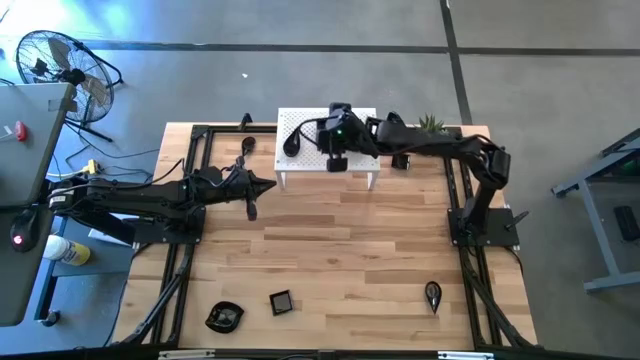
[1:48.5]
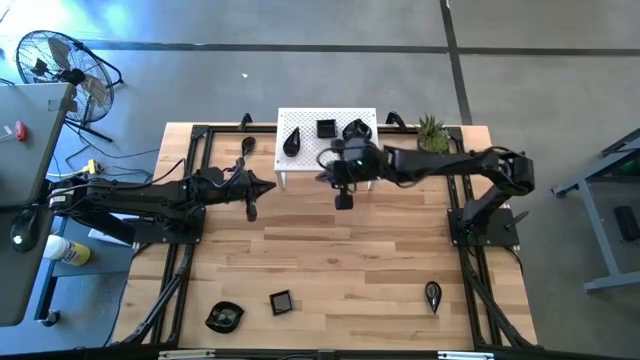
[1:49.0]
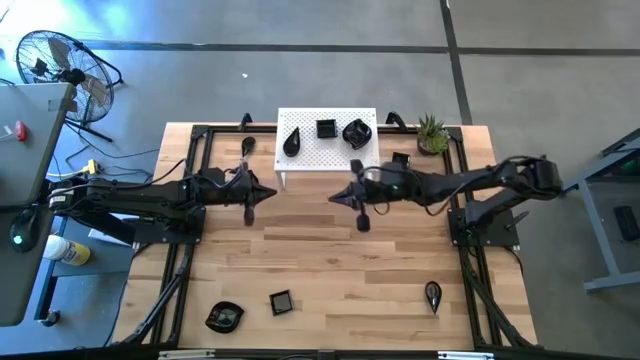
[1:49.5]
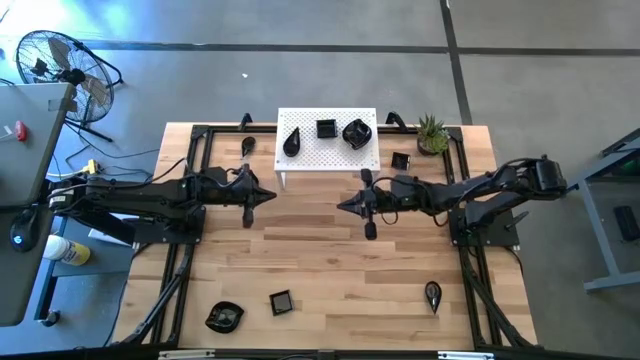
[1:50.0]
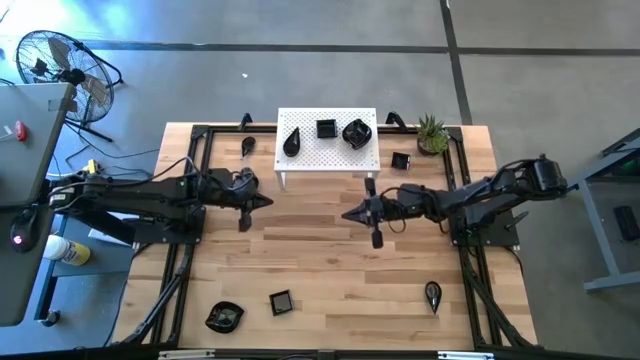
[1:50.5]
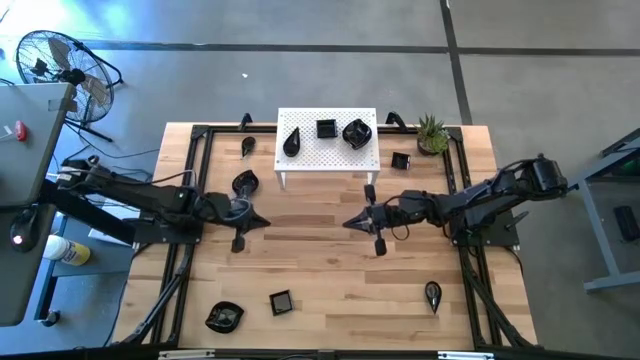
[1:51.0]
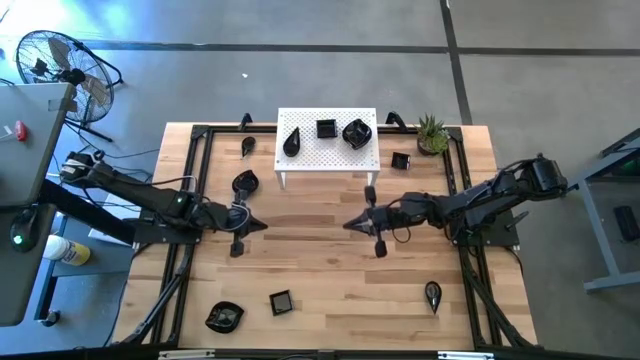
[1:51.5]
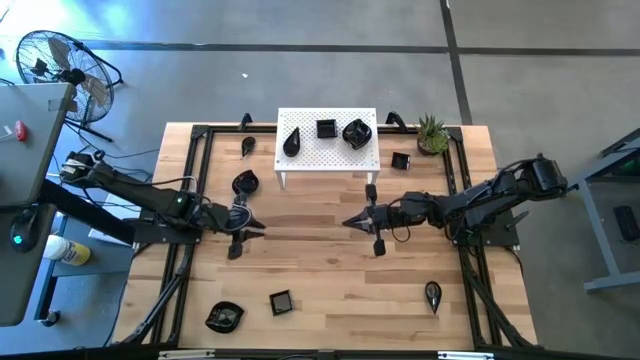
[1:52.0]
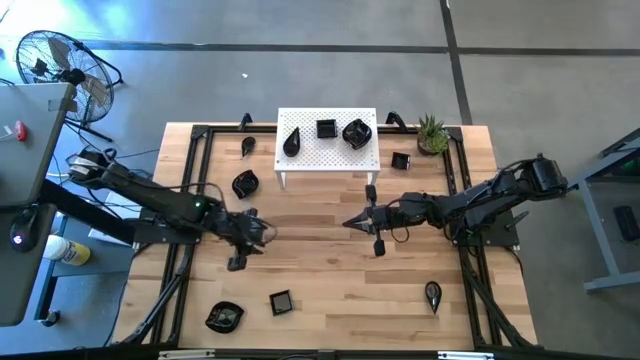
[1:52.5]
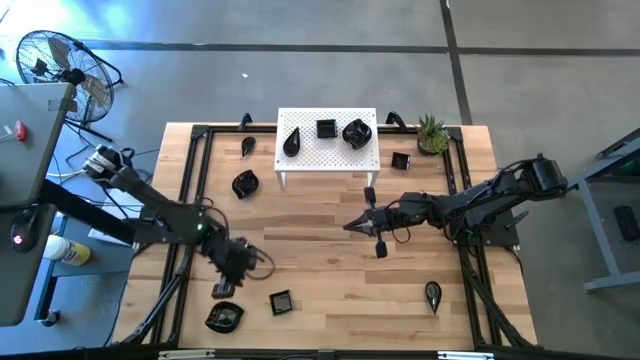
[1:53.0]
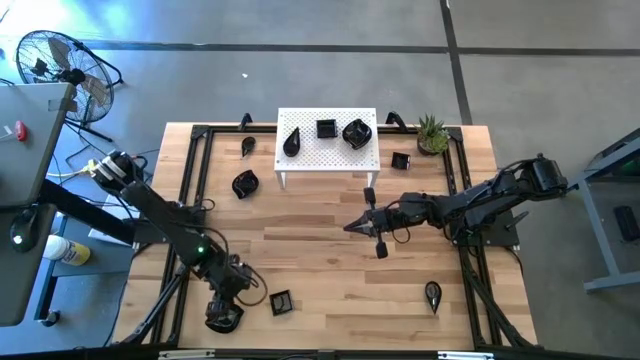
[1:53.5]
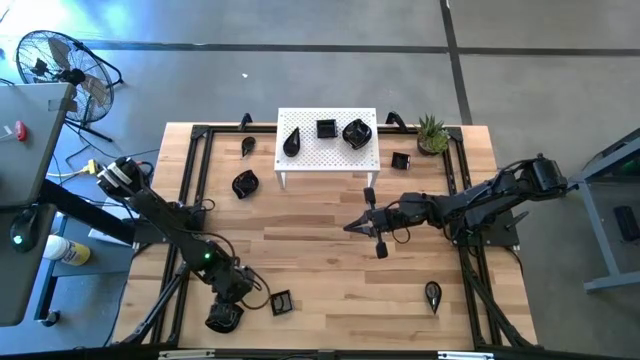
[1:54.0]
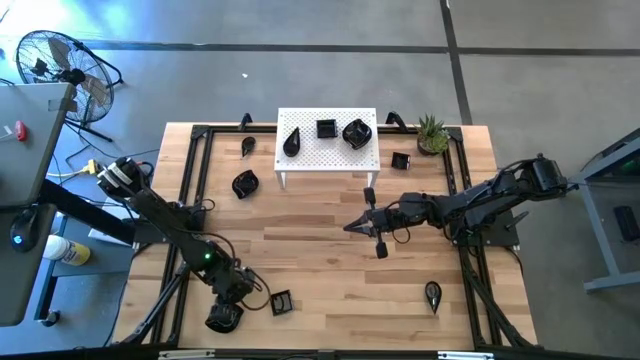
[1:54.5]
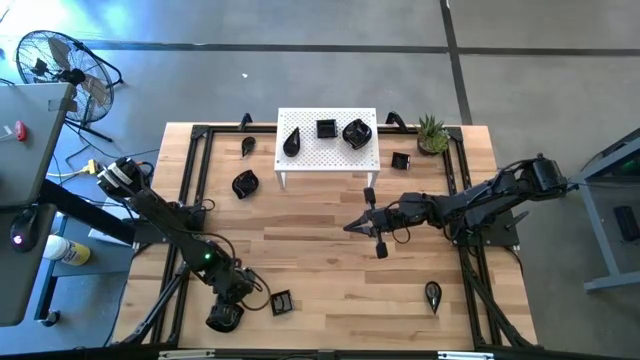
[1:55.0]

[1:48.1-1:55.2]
Task: Pick & Place Mini shaped plates
Stack the leaf shaped bowl on top of the leaf shaped bowls on the shelf

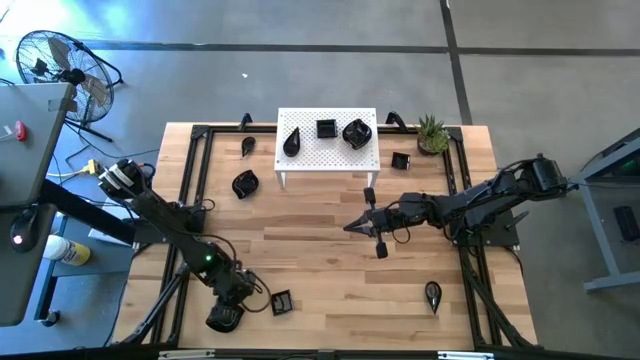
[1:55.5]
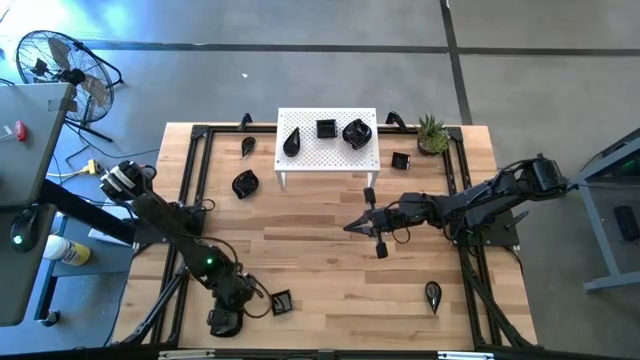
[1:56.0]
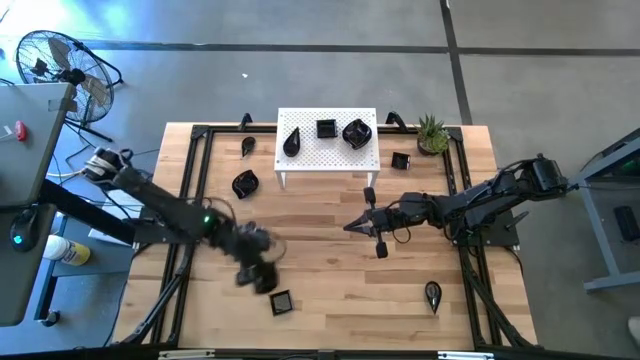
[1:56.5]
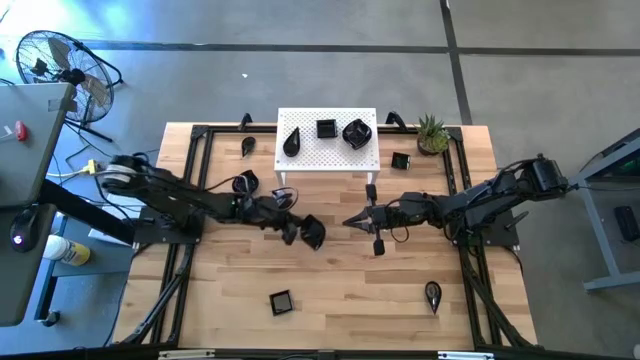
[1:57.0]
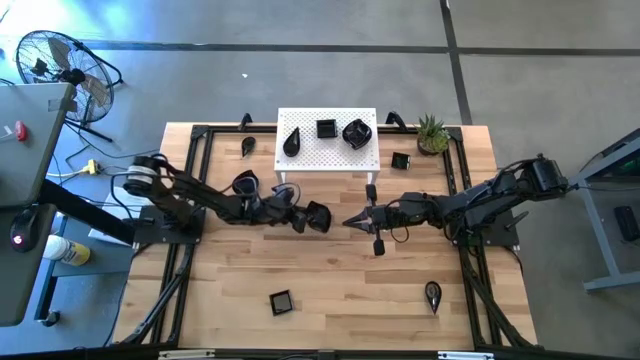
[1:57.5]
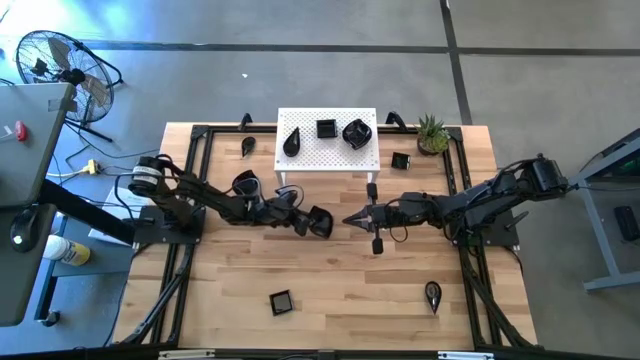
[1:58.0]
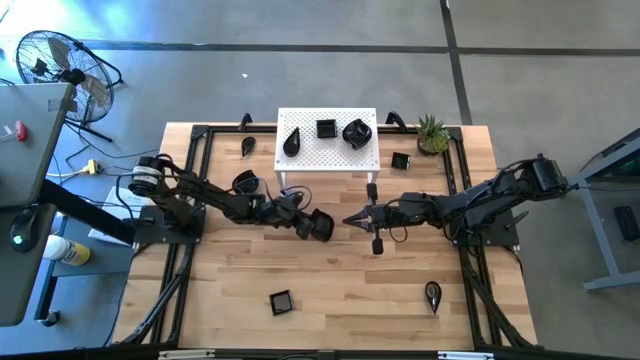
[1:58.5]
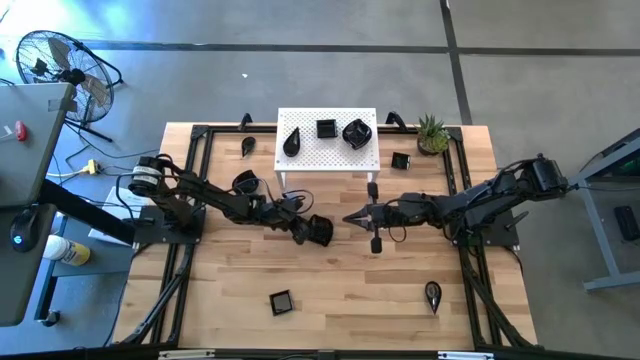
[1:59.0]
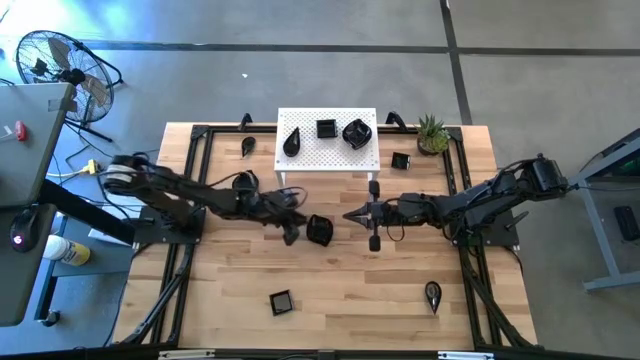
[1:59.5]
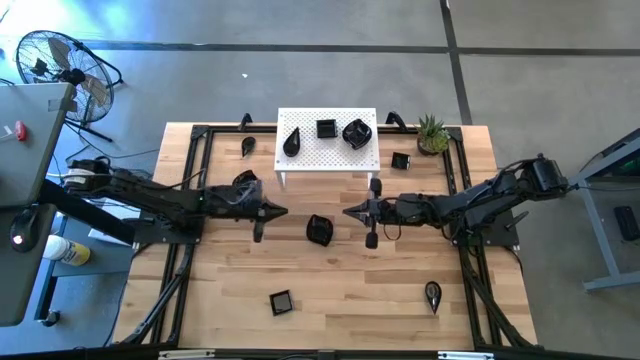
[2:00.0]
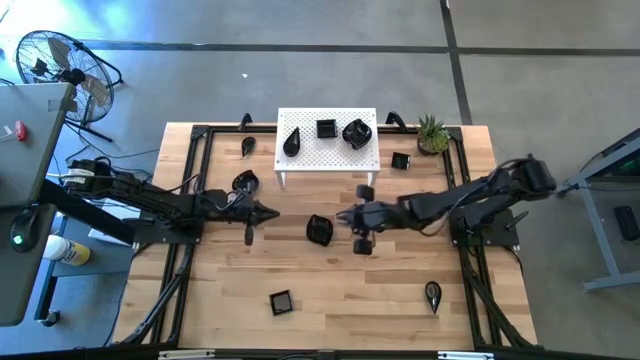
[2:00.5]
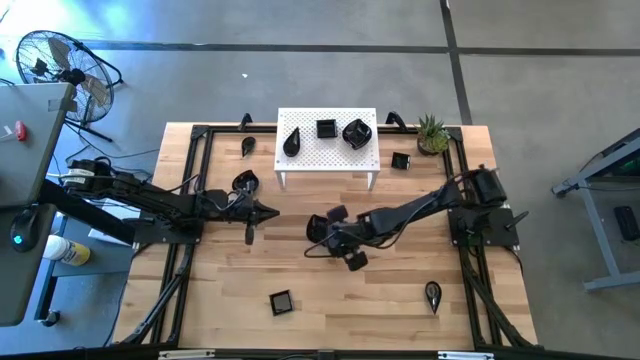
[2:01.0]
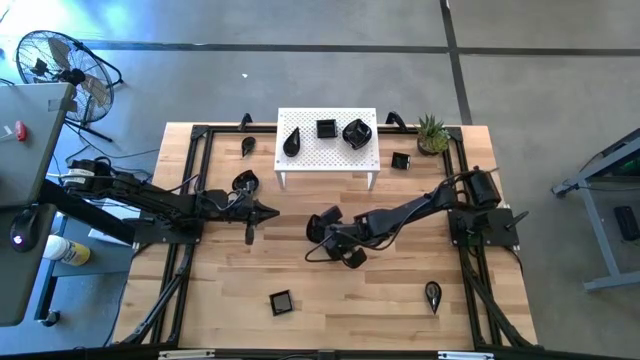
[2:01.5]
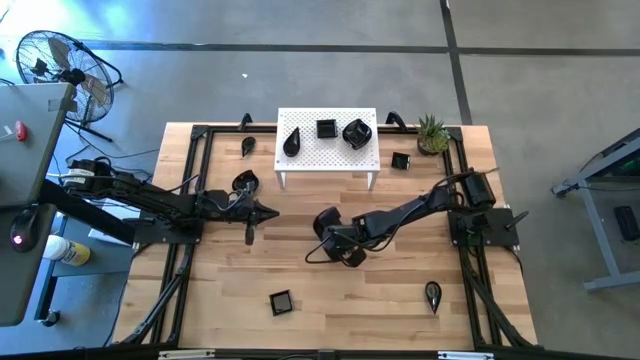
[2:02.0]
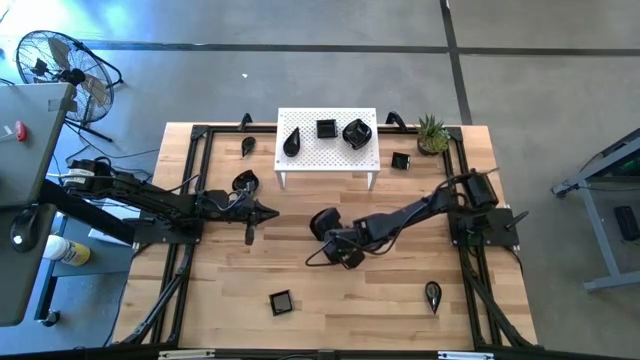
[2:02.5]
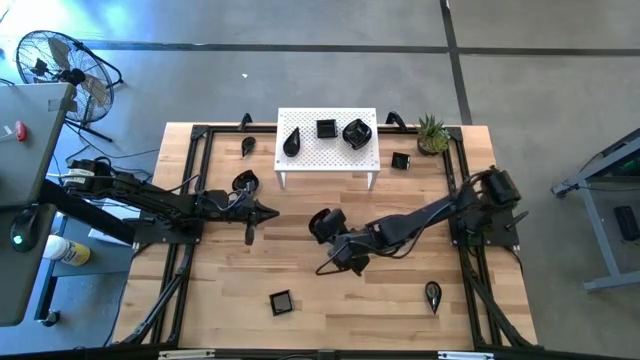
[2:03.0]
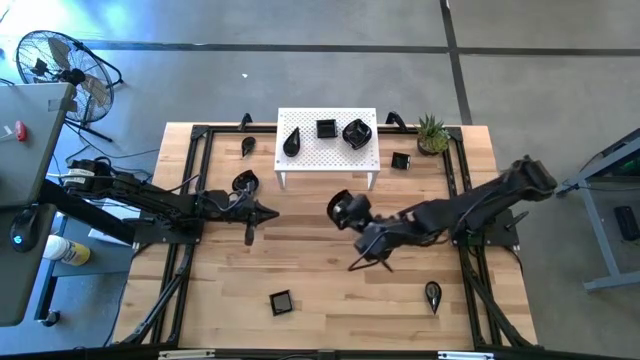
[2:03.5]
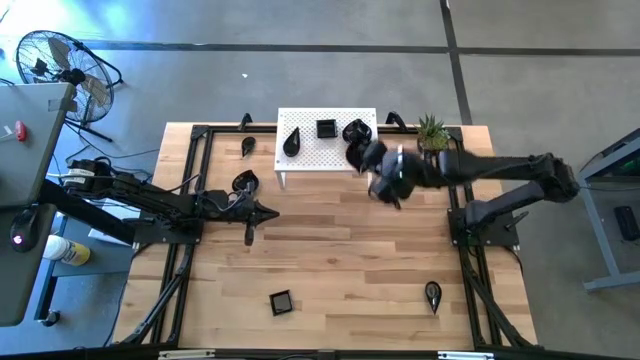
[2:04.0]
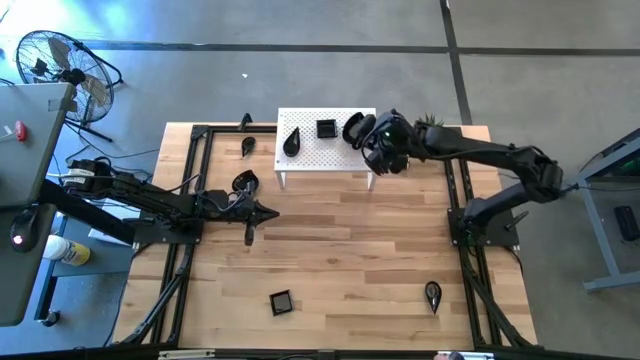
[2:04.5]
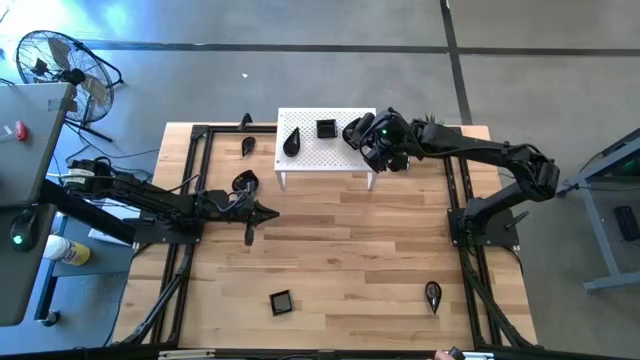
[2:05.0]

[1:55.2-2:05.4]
Stack the leaf shaped bowl on top of the leaf shaped bowls on the shelf

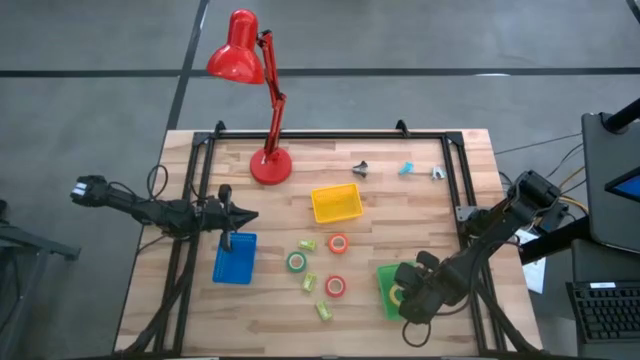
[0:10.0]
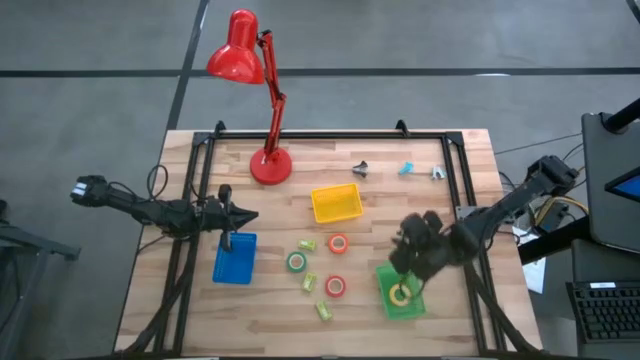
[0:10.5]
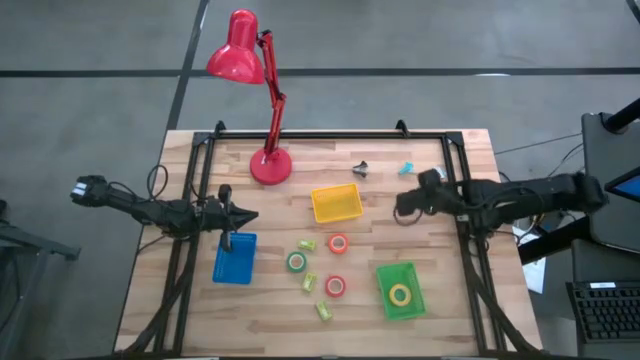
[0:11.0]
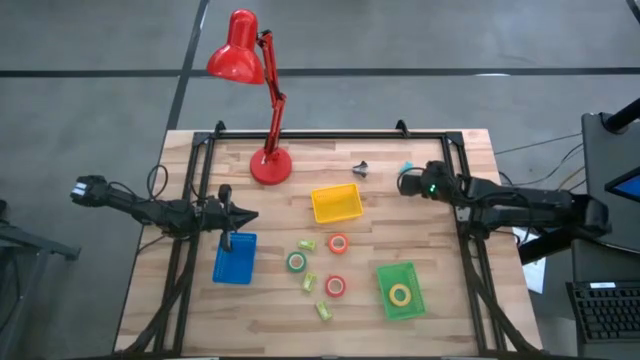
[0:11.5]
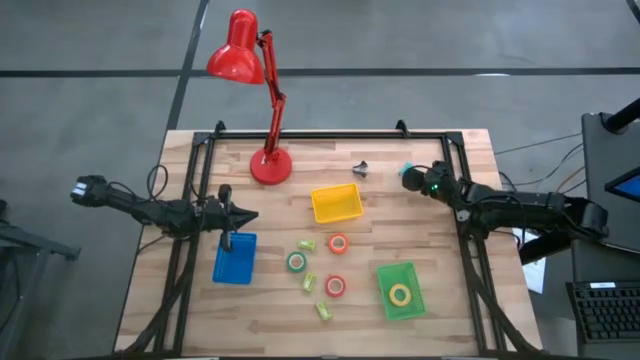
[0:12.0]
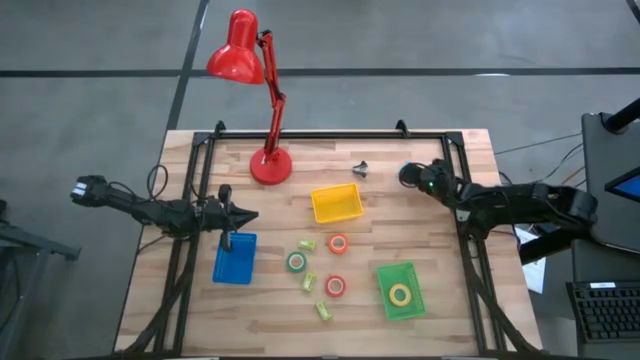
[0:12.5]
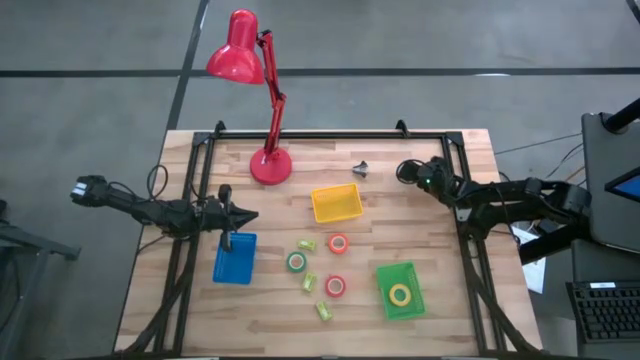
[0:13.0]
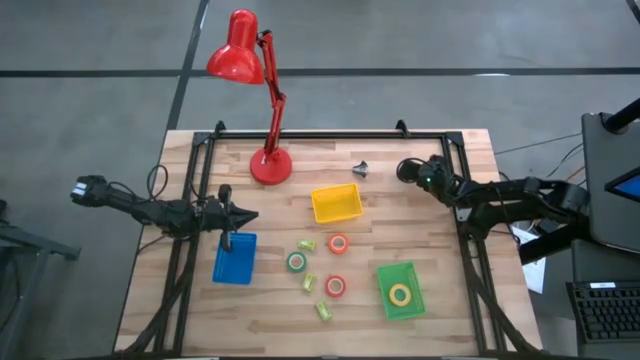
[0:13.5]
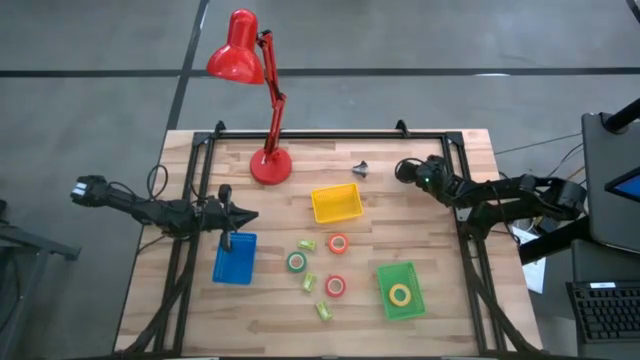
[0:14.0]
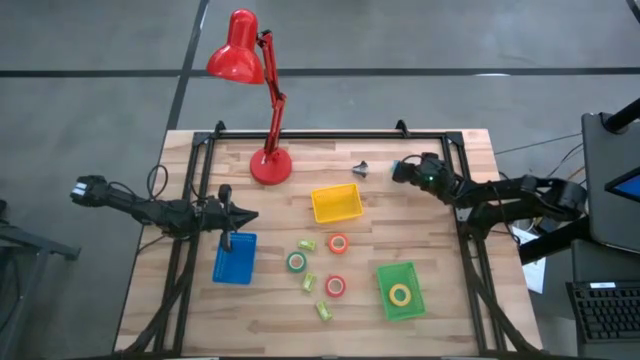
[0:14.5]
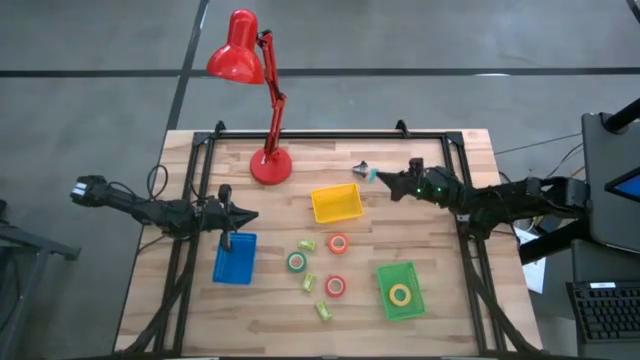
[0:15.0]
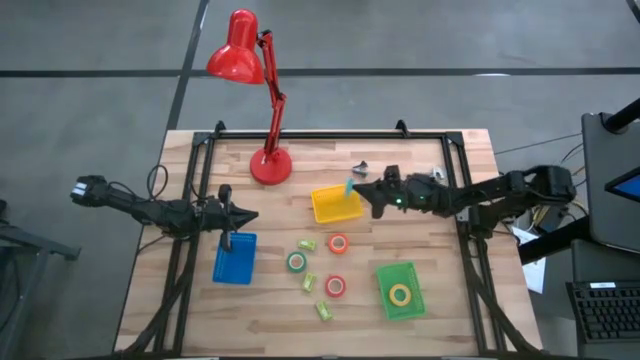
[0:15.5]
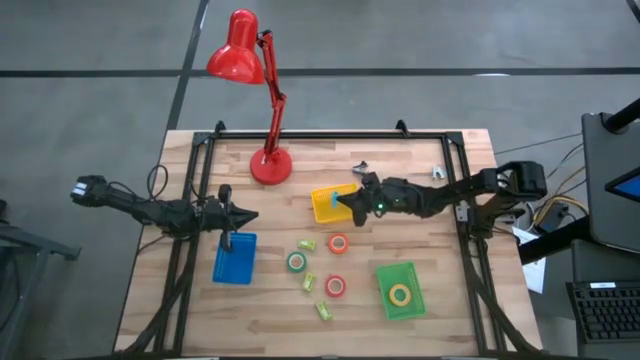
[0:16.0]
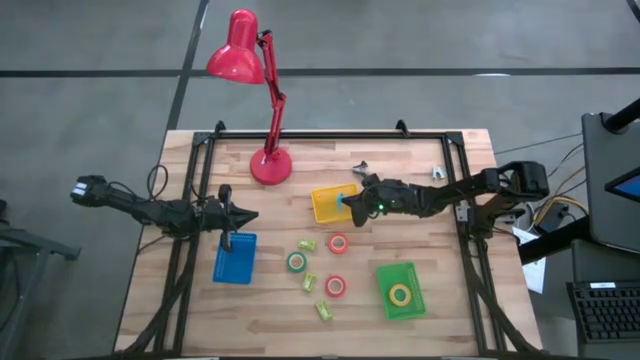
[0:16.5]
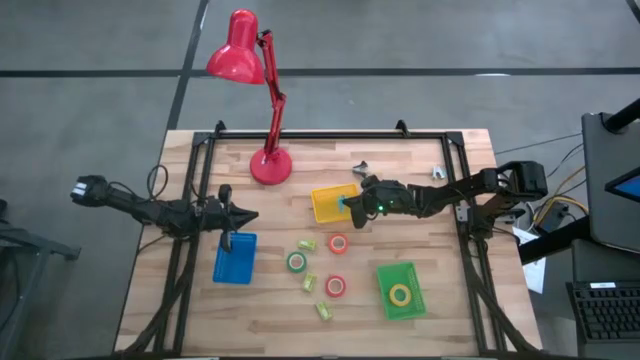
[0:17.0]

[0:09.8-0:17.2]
Task: Pick and place Stapler, Stapler remover, tape
Put the left light blue staple remover into the yellow bin
